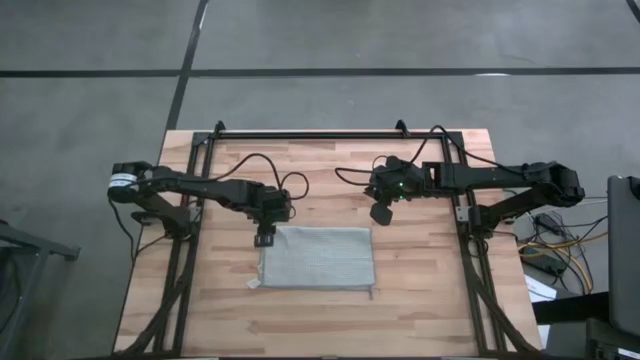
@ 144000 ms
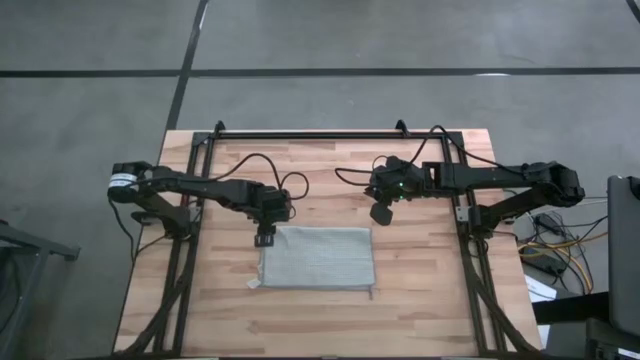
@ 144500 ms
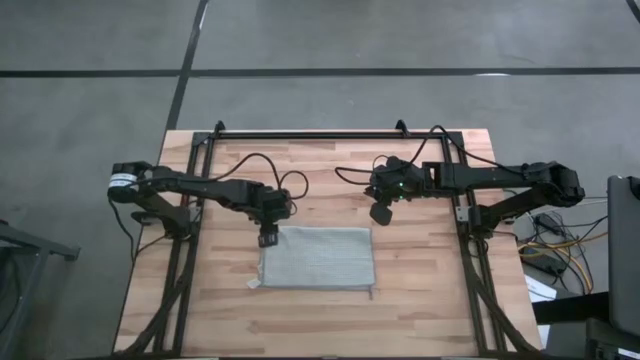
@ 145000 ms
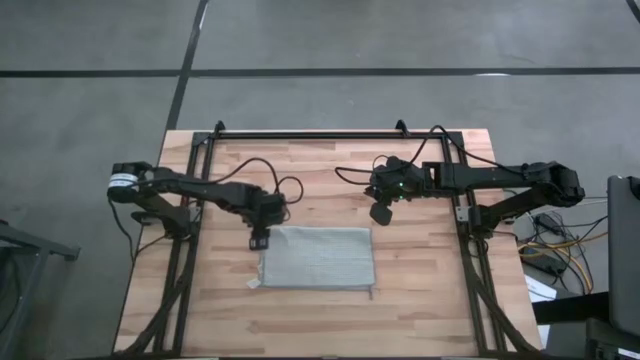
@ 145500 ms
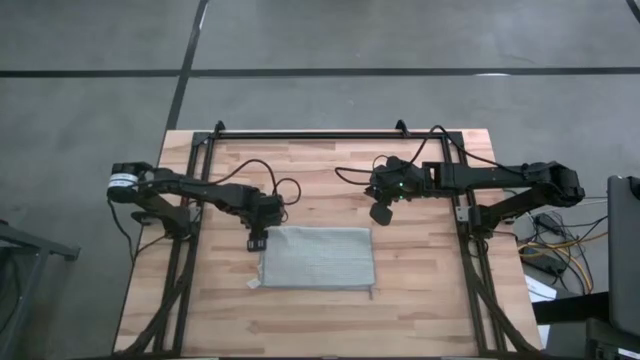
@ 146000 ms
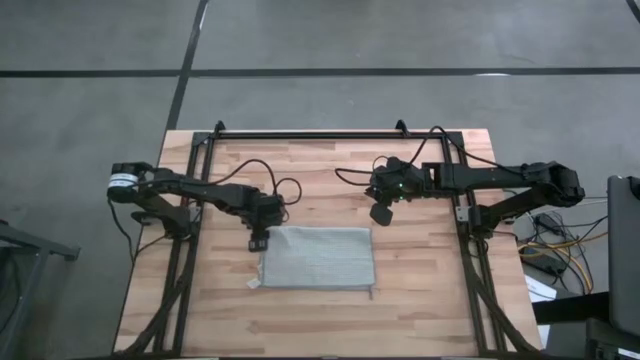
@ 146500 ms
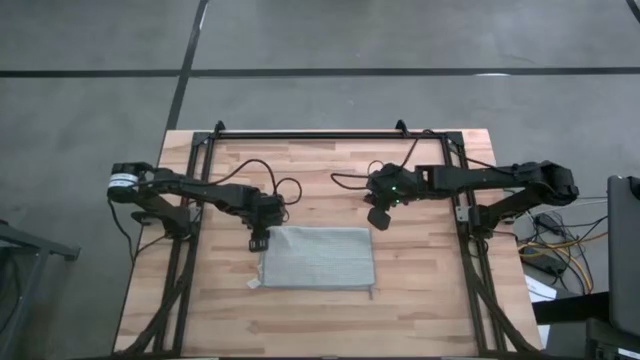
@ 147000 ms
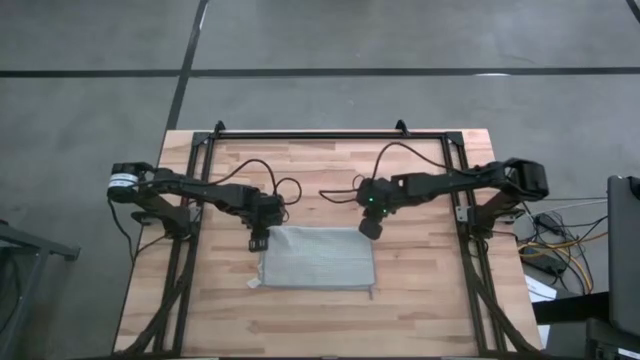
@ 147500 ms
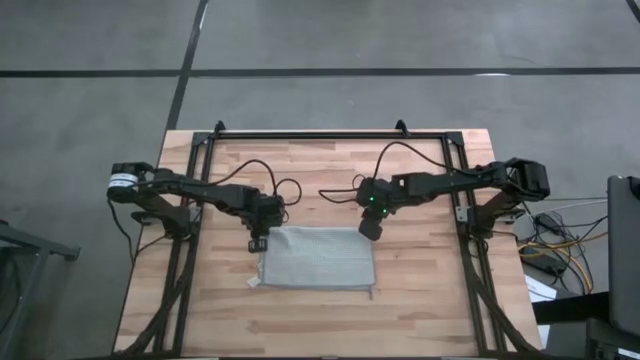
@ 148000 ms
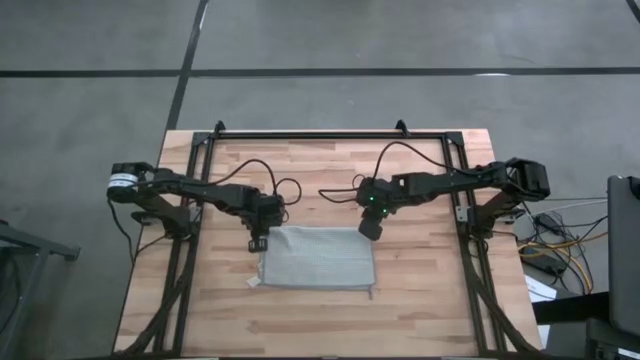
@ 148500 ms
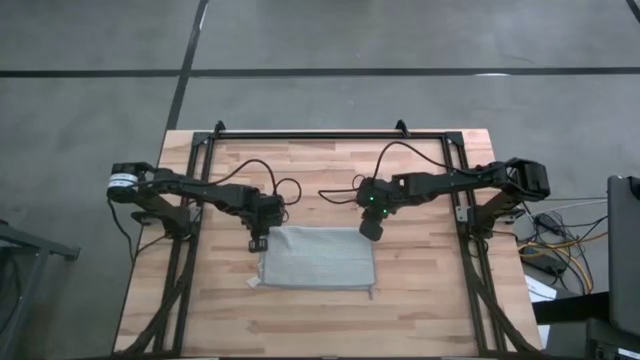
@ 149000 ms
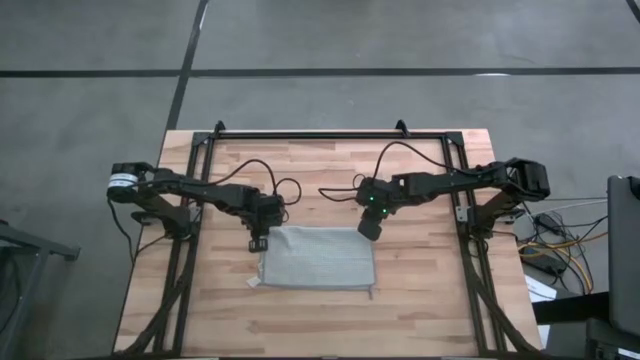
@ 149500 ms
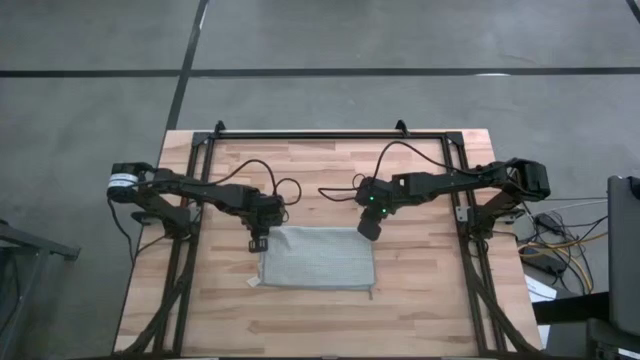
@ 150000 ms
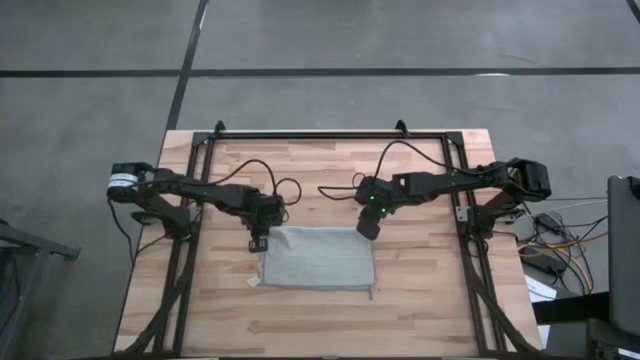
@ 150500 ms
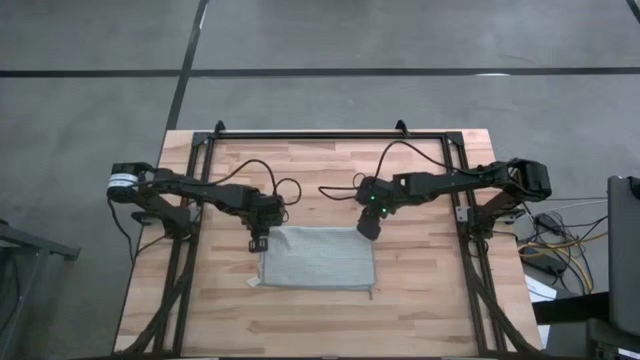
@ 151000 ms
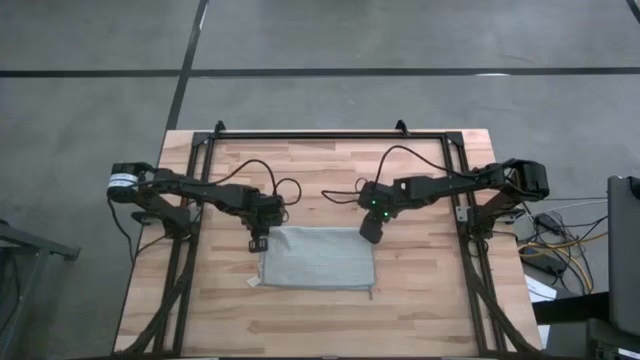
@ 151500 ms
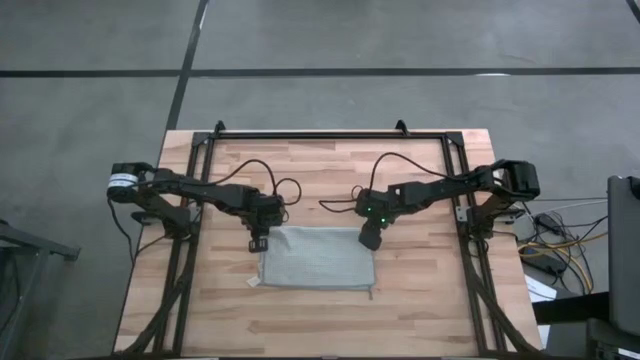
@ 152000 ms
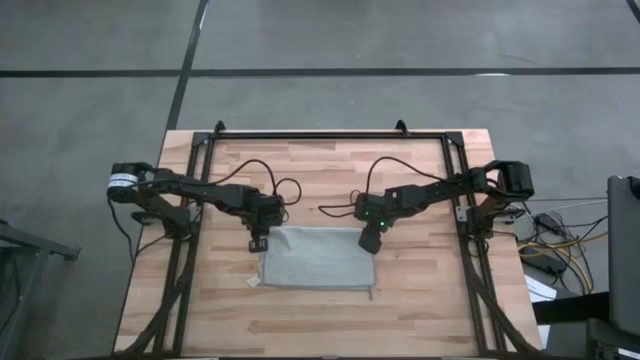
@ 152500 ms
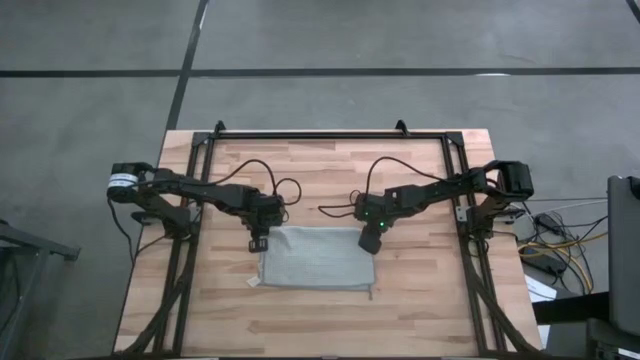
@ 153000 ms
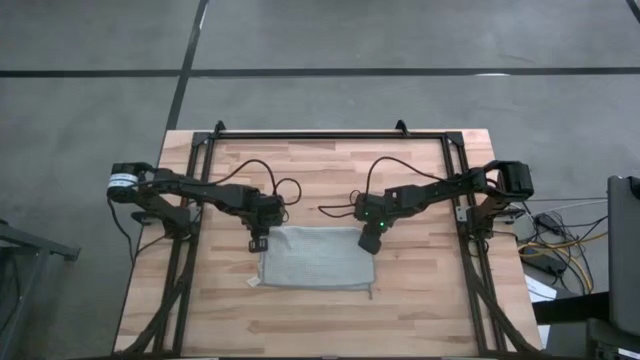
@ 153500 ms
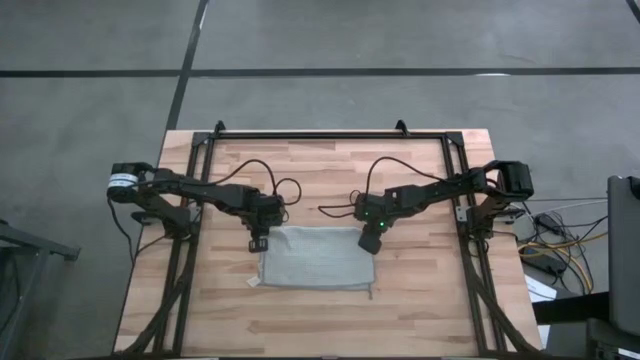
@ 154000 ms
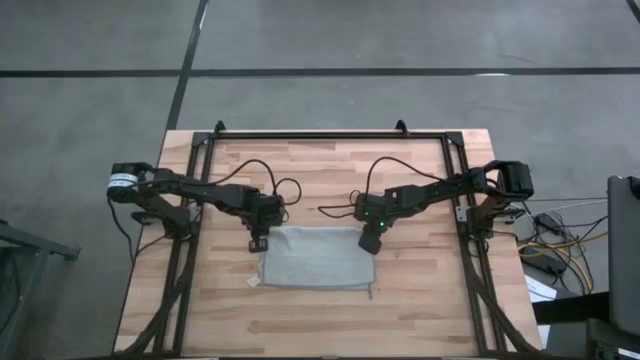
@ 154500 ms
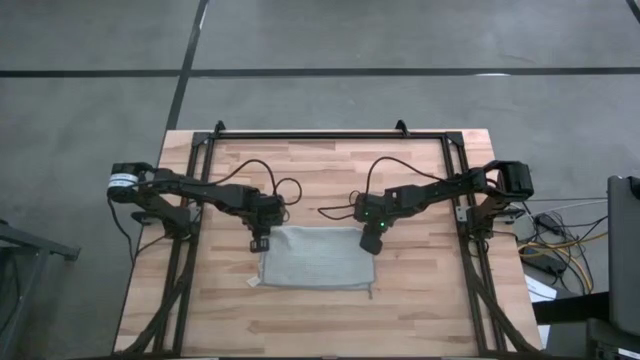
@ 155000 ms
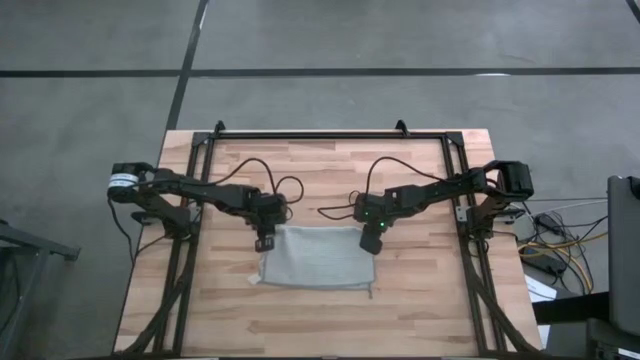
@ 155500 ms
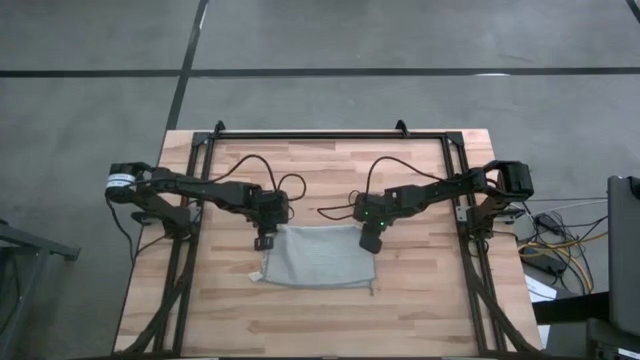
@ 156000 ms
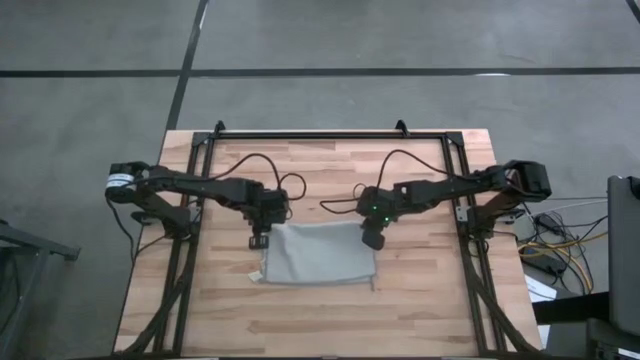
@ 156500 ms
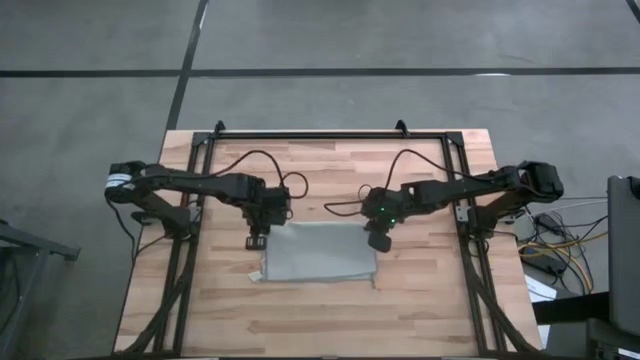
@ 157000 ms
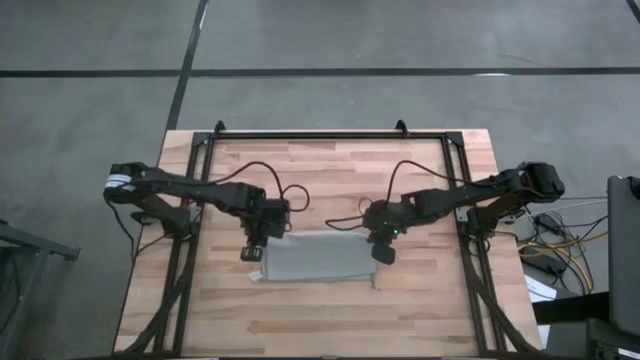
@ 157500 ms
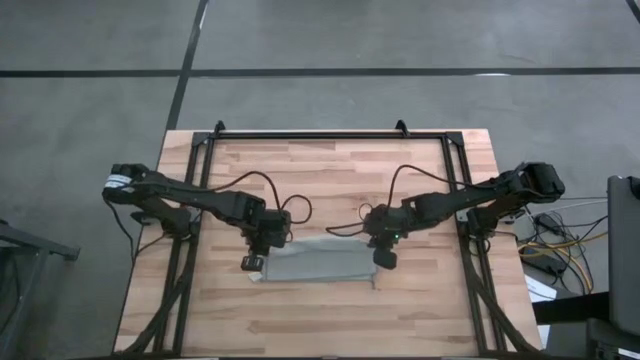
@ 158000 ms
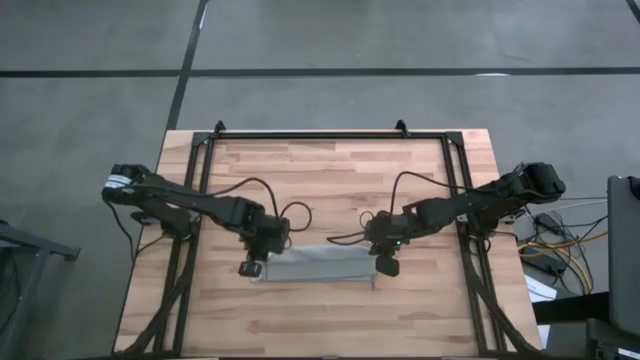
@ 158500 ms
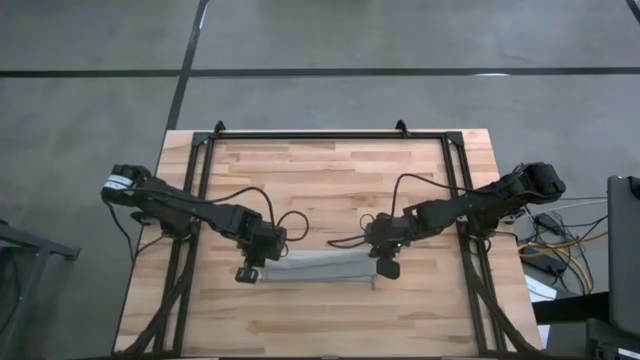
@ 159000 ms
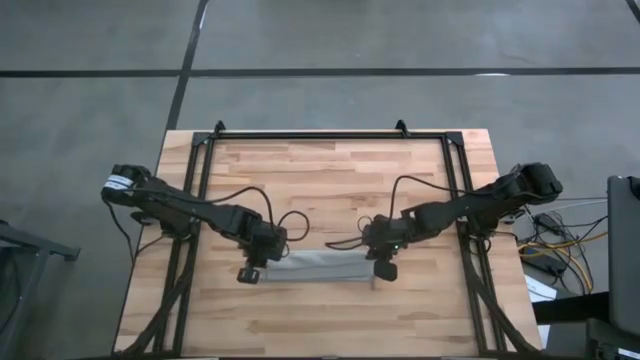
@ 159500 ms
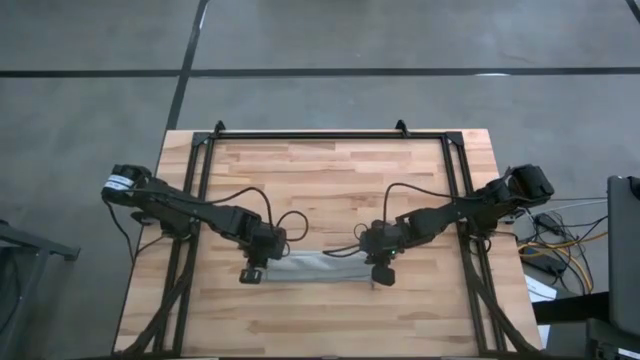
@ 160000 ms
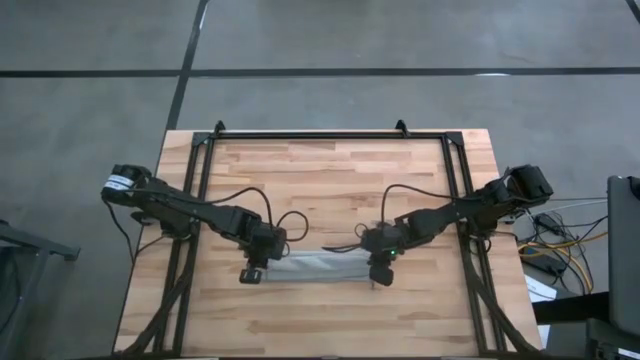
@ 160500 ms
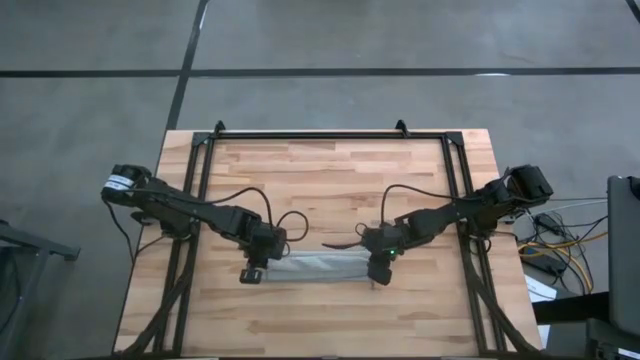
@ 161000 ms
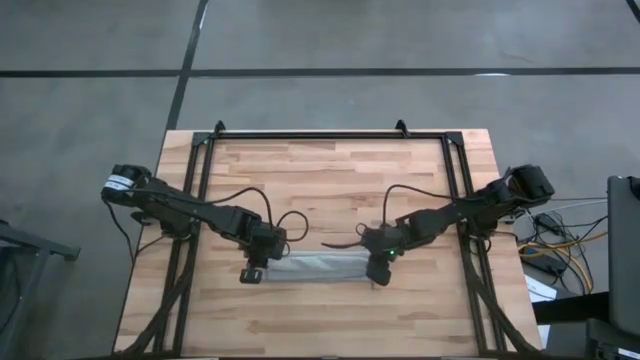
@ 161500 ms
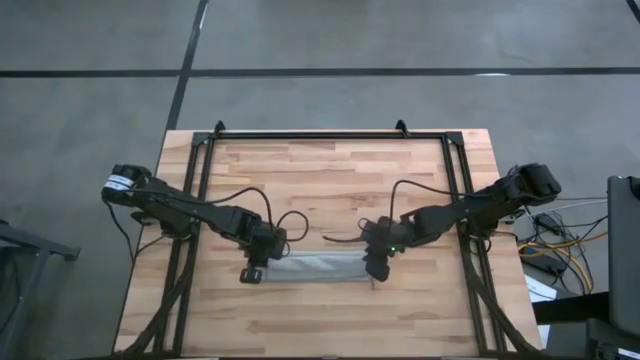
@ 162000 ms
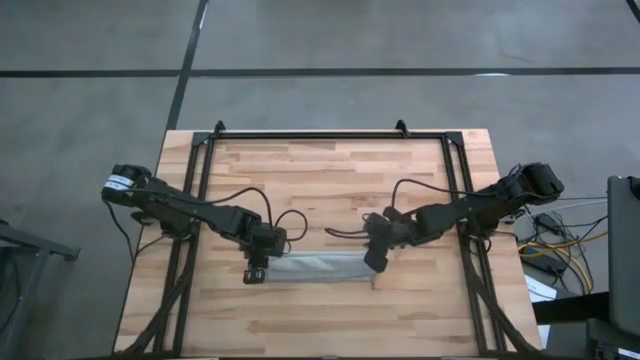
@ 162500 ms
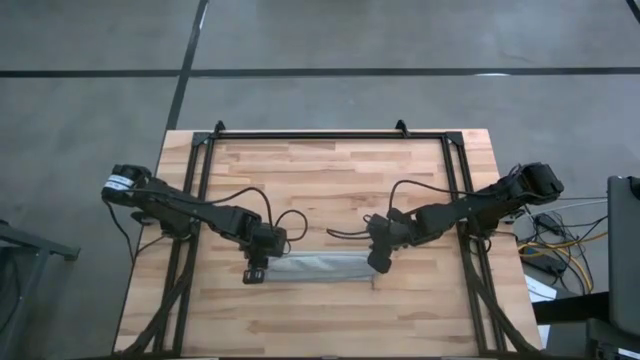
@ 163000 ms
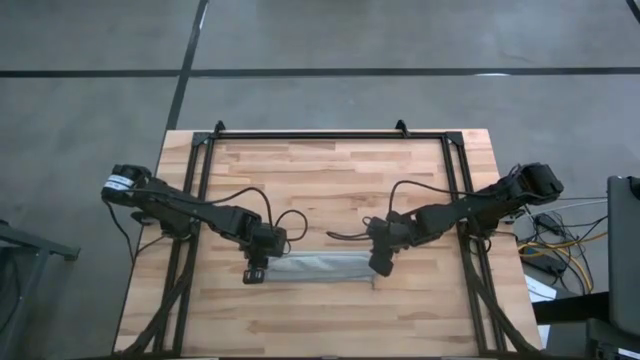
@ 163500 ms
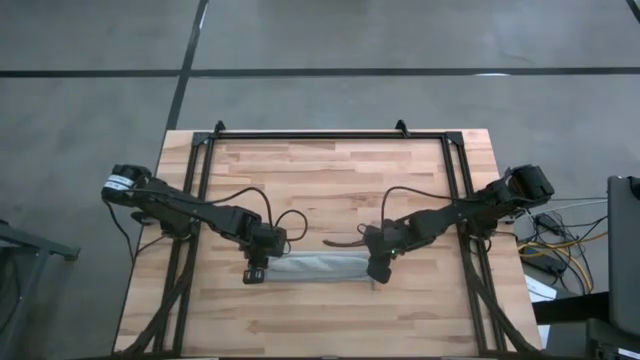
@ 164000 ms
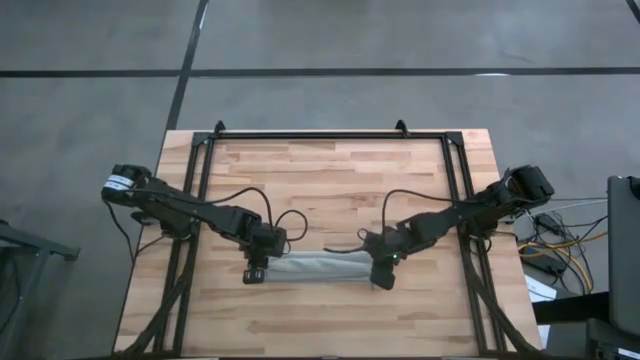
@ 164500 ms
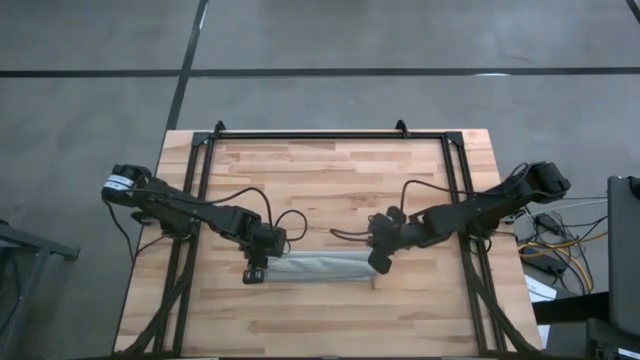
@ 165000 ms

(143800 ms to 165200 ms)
Task: Fold microfiber towels
Fold the microfiber cloth on the table
